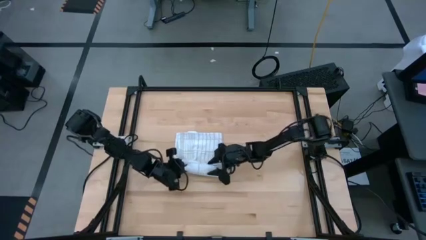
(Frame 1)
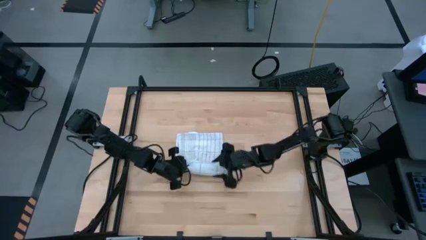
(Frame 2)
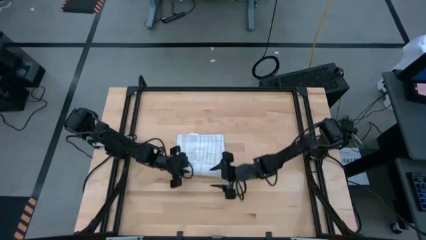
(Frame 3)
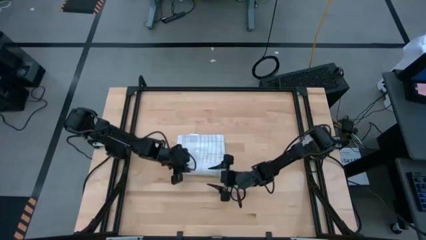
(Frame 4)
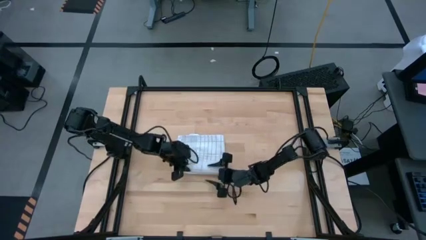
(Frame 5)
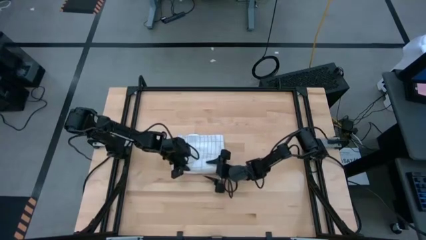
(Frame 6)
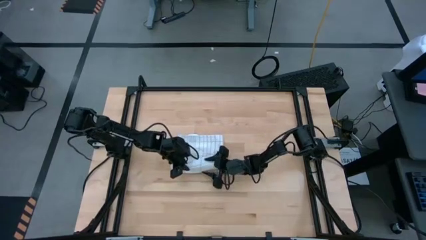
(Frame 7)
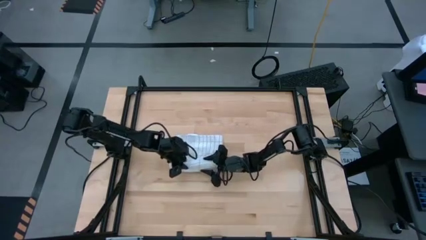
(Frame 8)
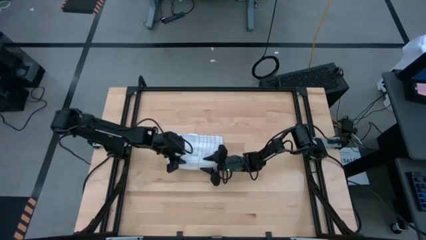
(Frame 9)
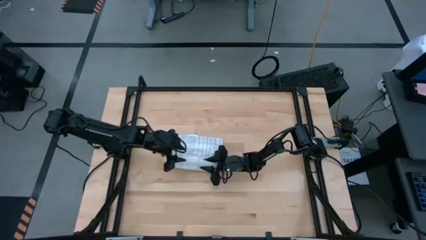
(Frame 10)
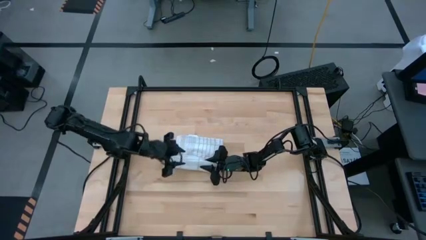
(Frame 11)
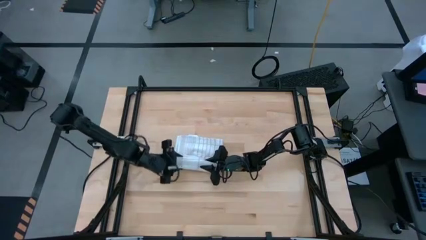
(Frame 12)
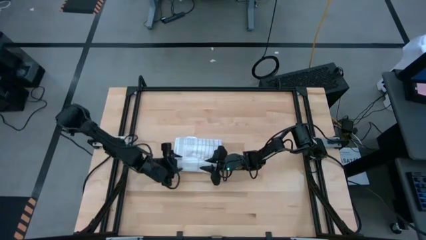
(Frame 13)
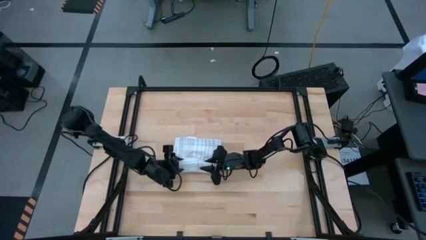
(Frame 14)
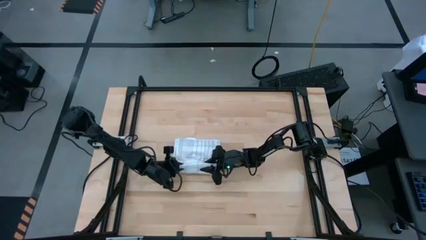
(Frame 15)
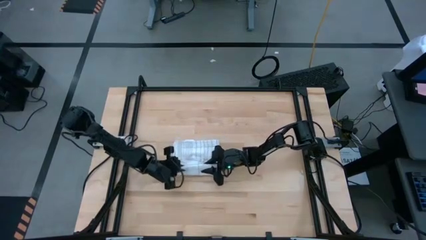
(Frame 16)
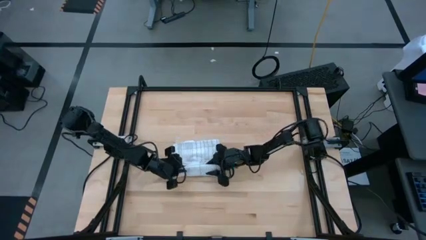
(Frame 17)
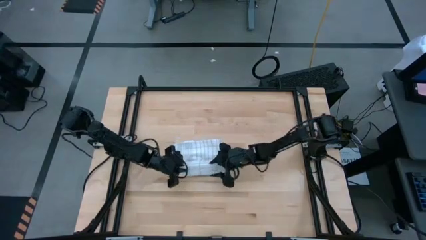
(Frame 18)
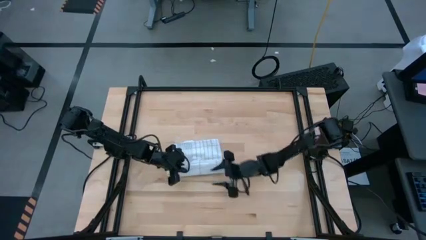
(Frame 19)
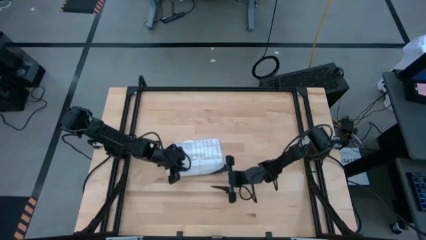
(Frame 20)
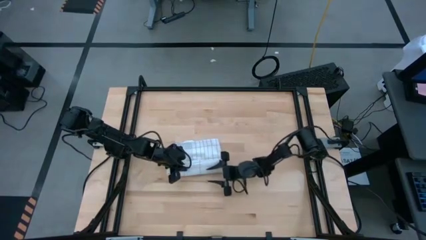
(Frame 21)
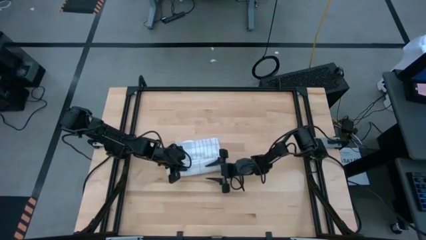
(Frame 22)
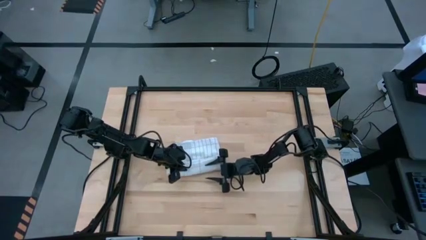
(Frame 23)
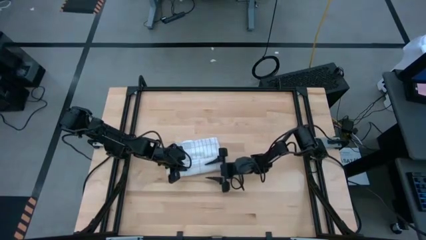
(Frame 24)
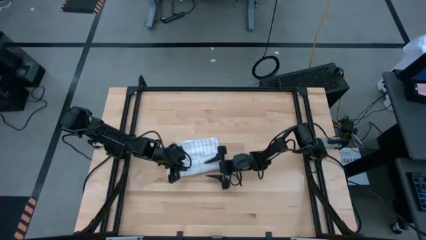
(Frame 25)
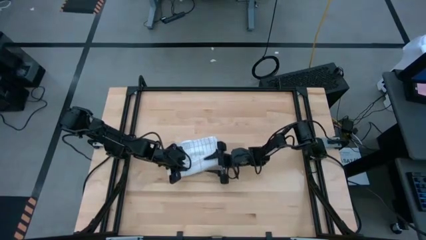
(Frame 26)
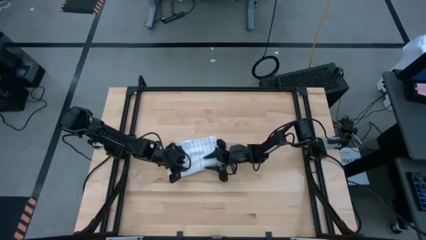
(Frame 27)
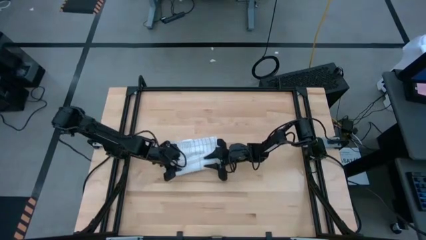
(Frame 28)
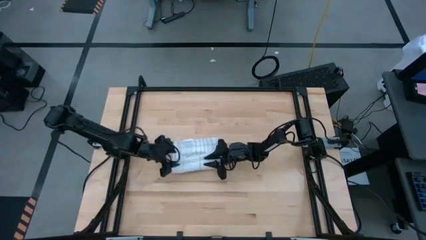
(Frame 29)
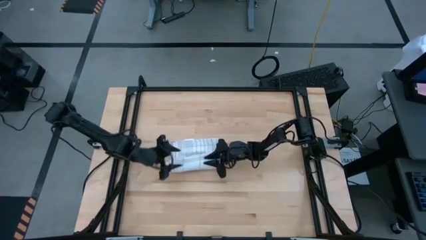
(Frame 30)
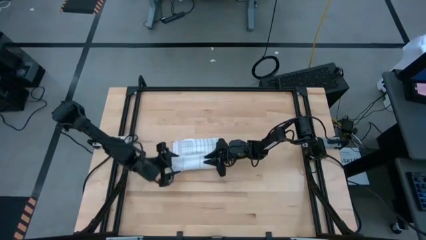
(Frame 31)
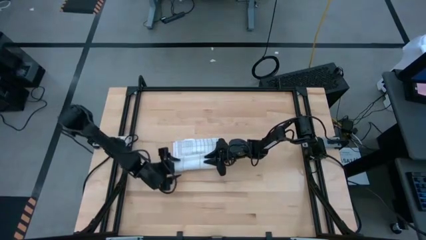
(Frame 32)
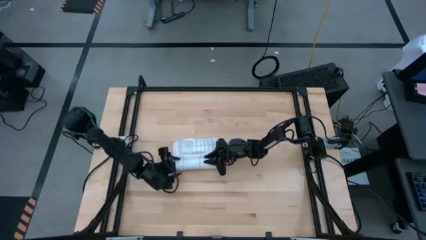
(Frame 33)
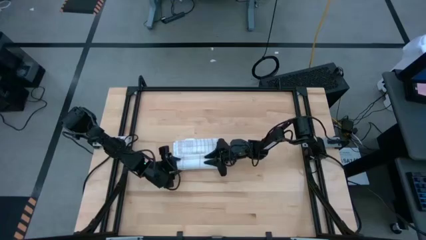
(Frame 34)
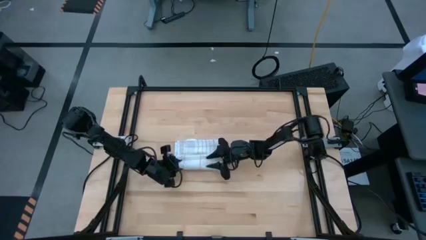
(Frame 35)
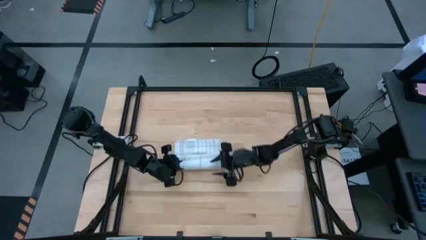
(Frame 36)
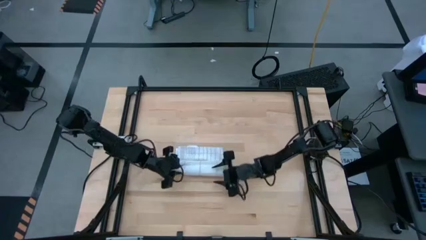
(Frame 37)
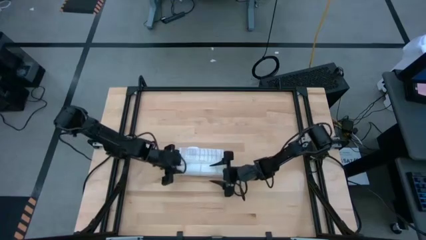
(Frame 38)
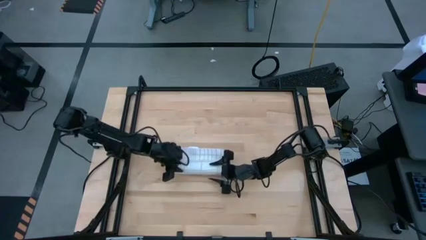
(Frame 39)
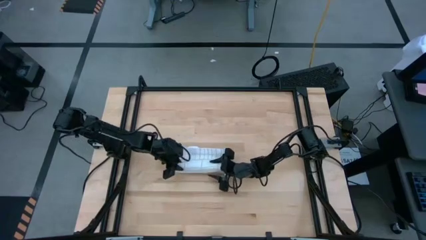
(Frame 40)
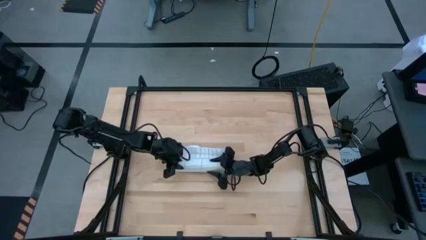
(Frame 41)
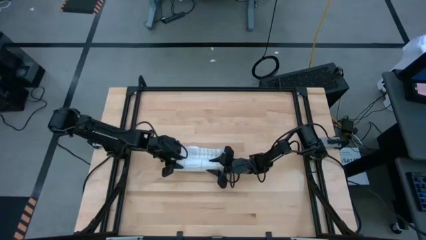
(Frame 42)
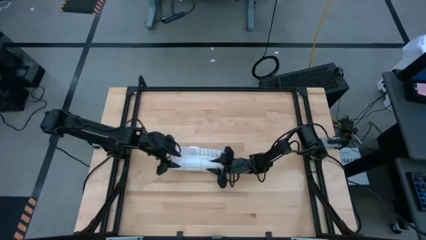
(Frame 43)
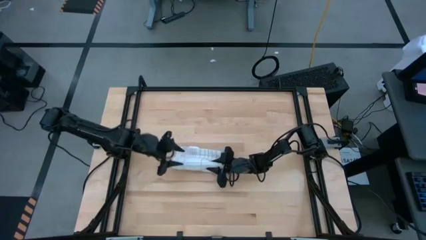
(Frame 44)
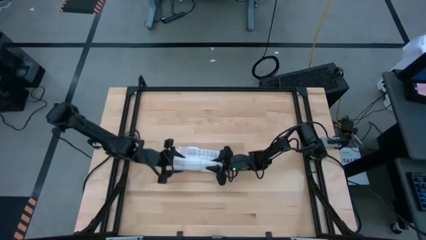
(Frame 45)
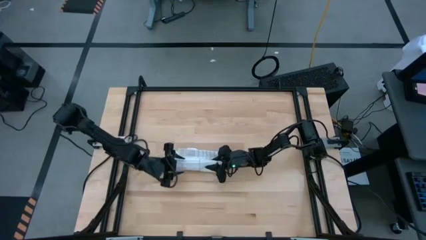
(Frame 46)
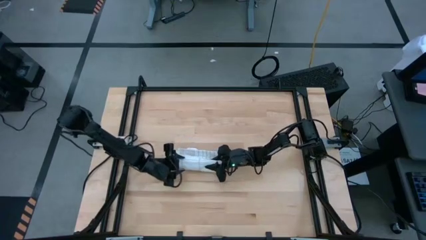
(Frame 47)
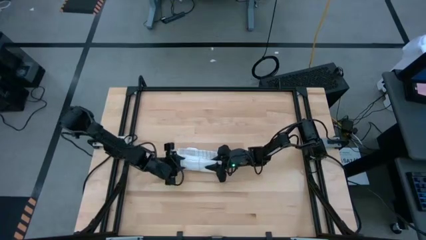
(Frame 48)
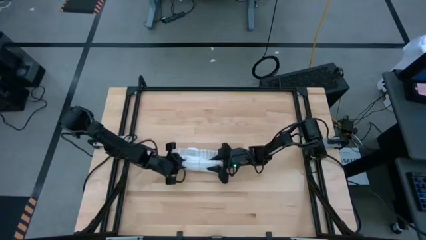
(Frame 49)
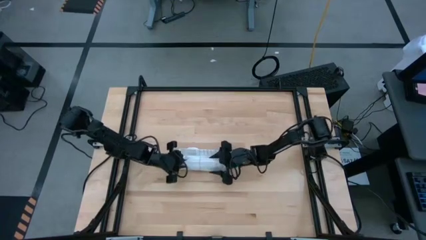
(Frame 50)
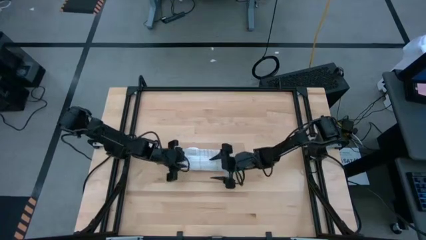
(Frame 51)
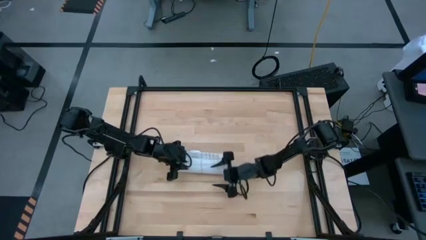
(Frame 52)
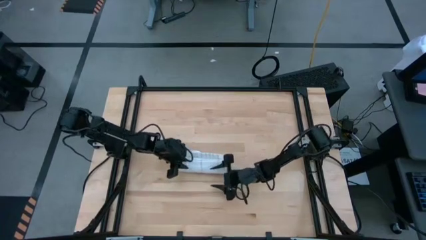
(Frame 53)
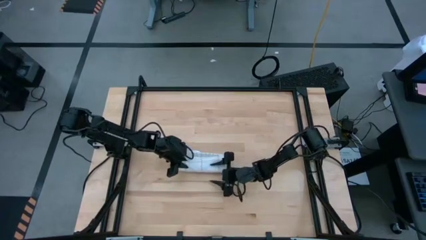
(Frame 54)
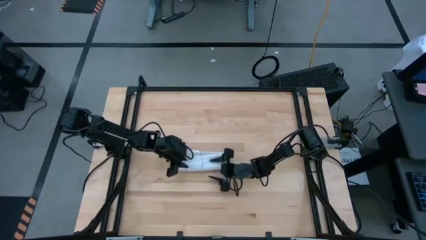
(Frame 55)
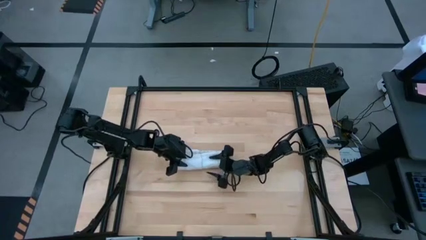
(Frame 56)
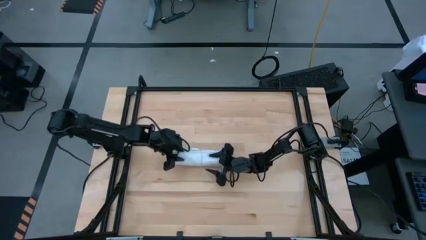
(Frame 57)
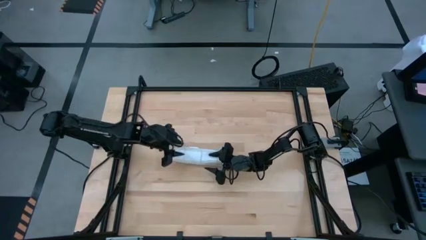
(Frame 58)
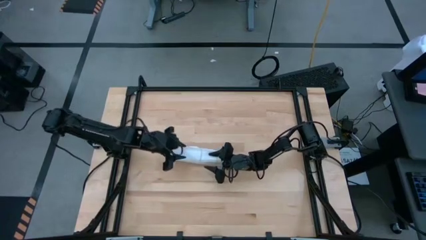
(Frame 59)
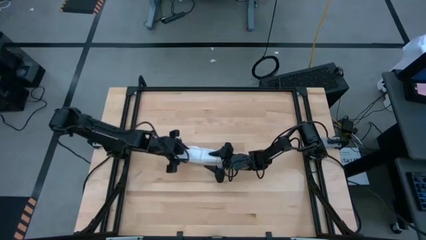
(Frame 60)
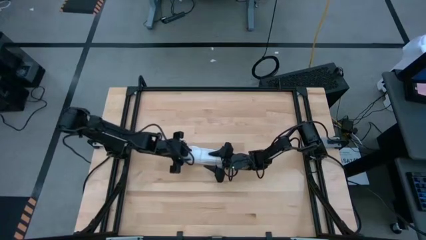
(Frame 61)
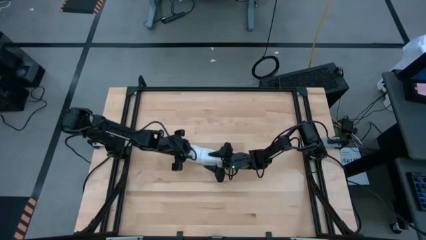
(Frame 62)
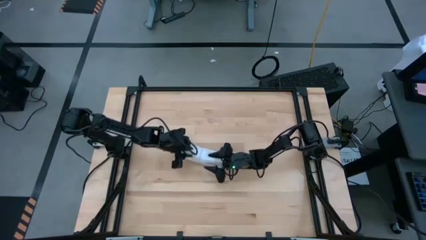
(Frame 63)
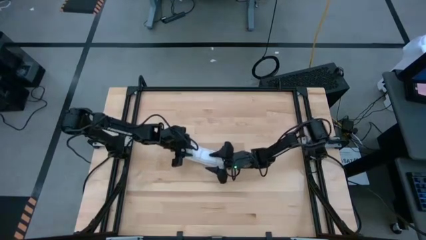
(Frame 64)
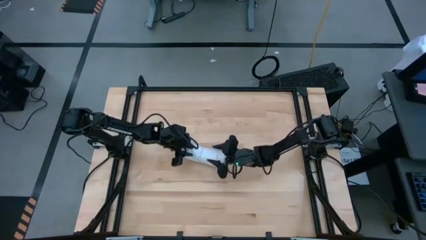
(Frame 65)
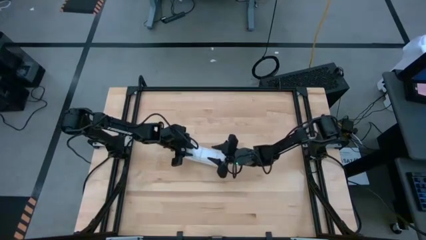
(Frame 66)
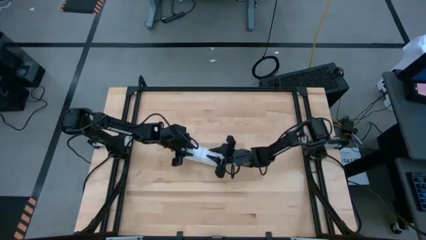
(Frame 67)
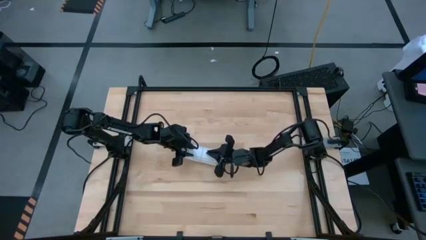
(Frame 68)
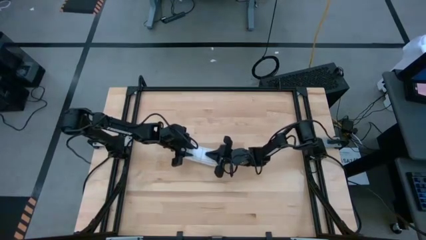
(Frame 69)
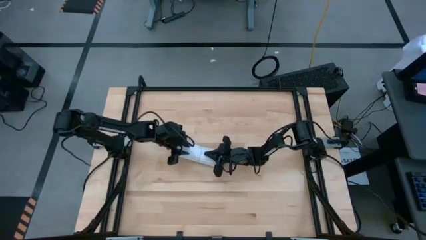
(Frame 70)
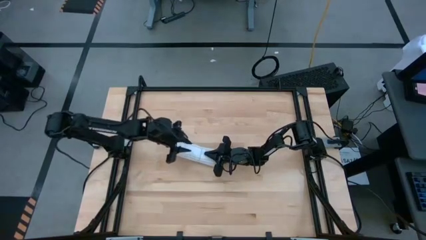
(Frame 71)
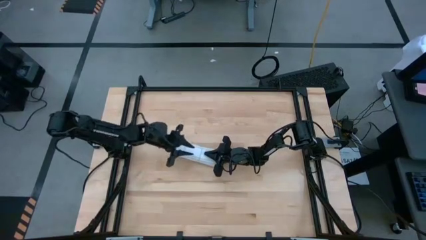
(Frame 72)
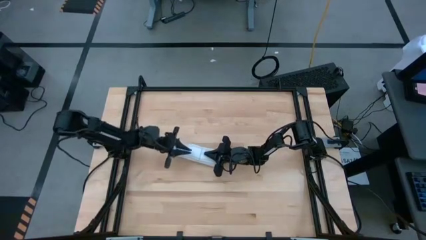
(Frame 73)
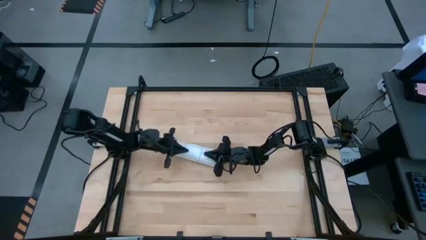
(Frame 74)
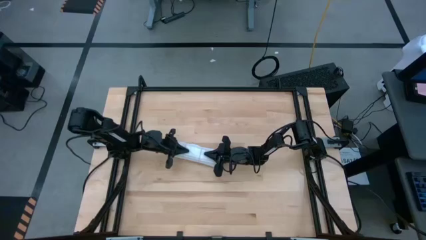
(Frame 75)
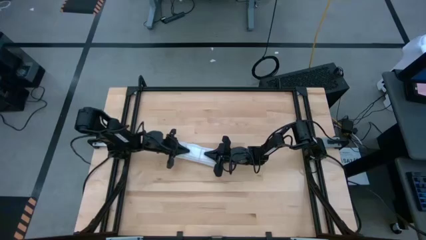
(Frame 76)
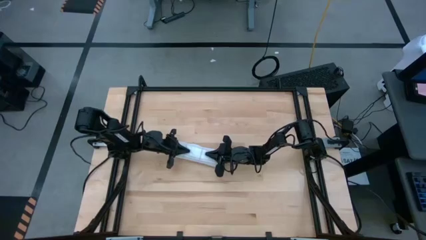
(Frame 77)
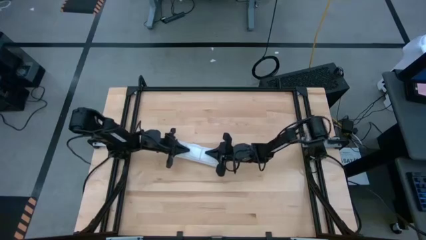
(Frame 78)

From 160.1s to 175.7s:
Task: Roll towel
Roll the white towel

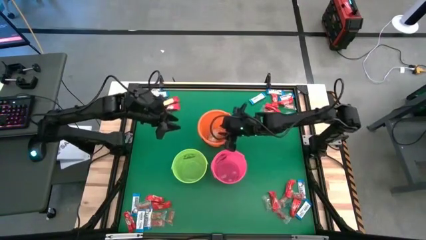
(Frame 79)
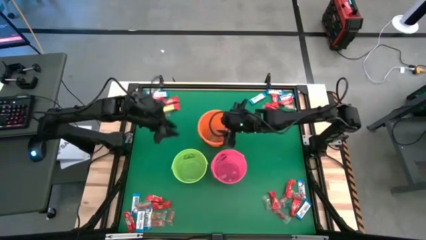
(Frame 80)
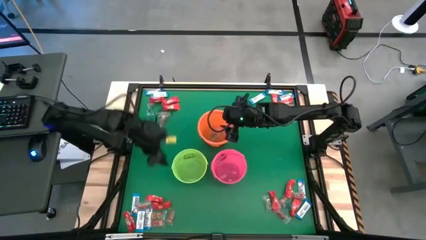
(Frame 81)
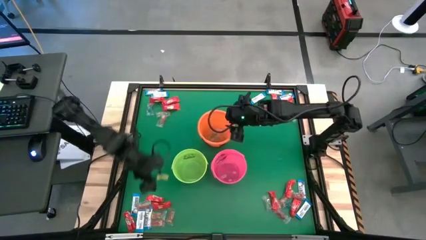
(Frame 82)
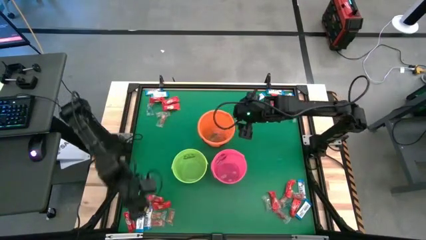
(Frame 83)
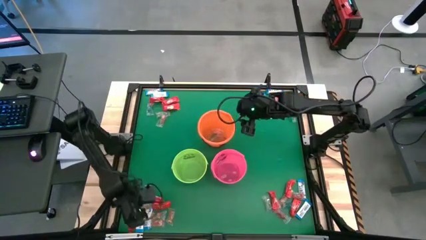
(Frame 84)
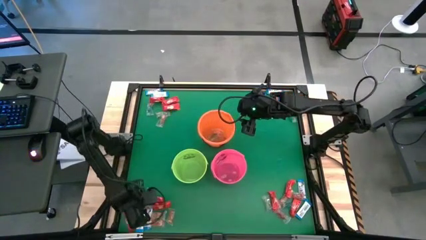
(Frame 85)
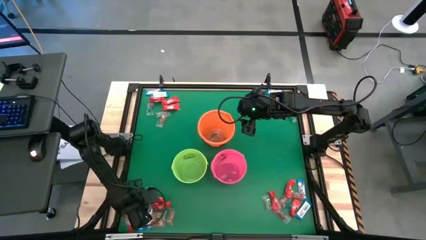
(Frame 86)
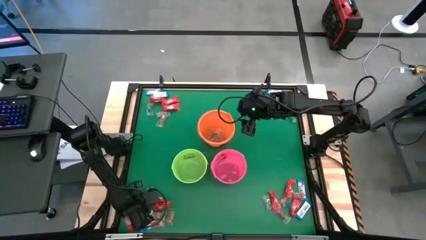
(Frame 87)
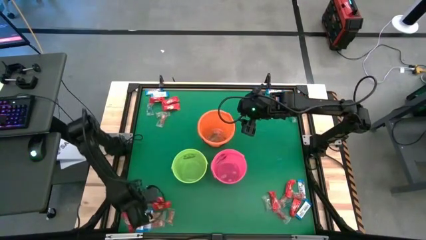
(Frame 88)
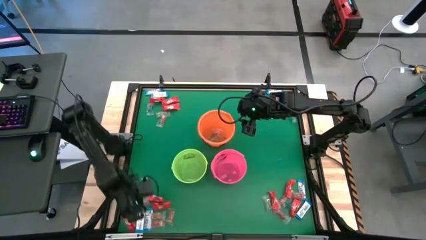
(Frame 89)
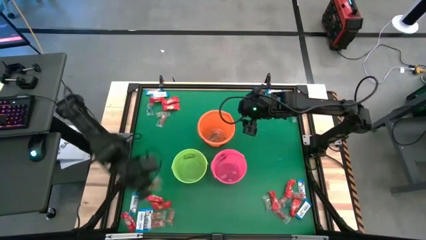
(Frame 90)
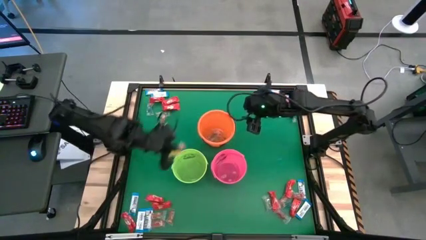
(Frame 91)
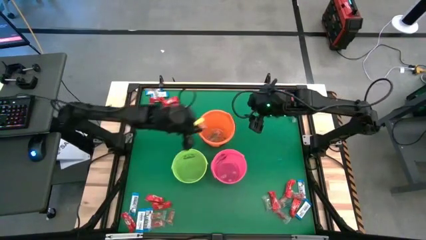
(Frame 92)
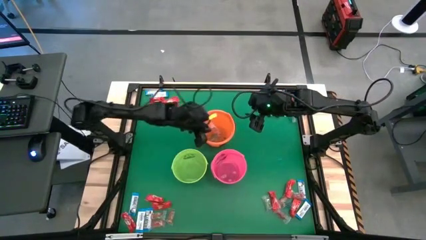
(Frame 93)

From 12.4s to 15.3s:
Task: Sort candy by brand, put in halloween buckets
Put the orange gummy into the orange bucket
